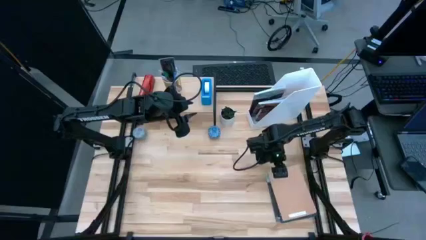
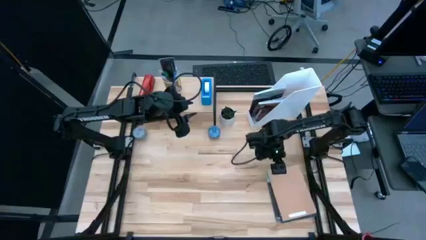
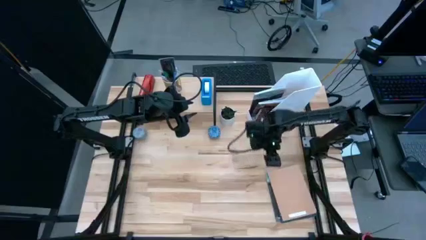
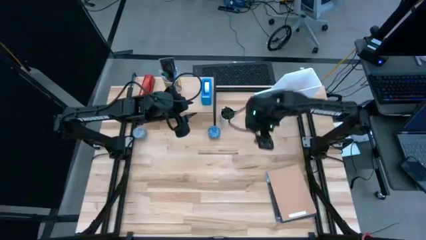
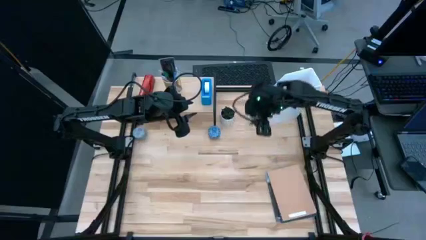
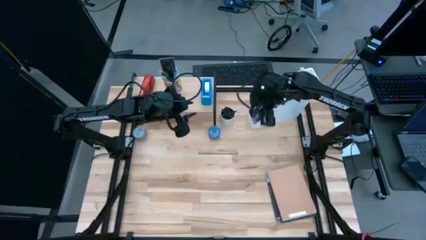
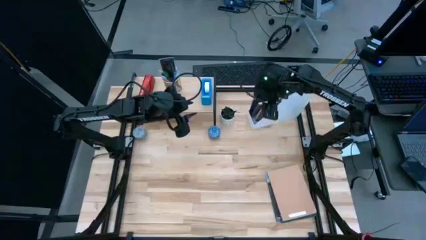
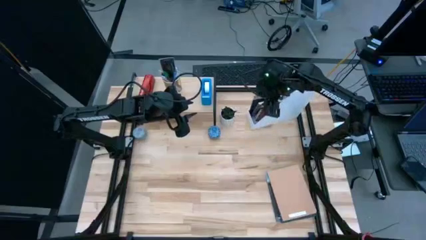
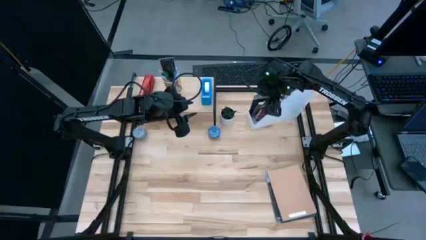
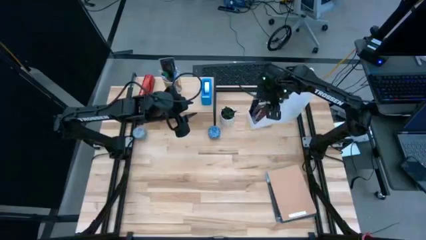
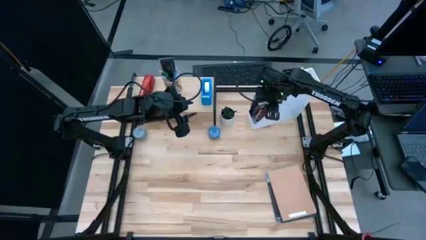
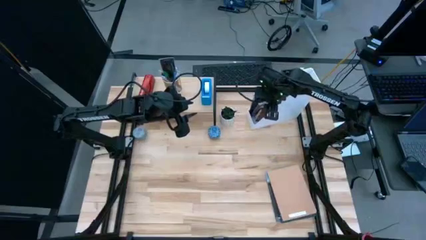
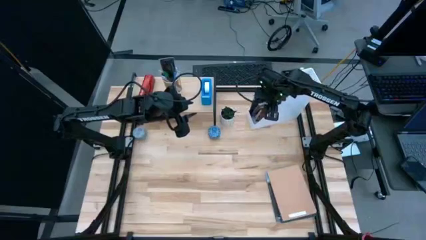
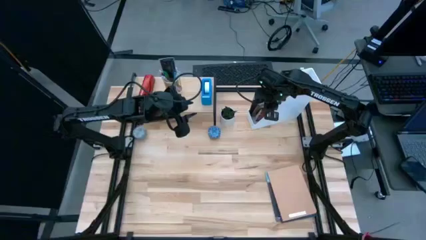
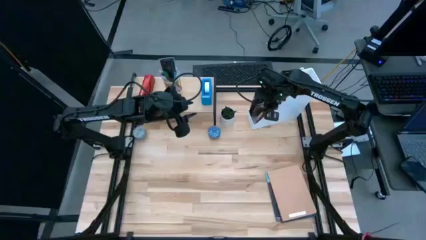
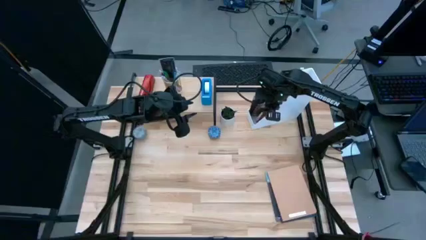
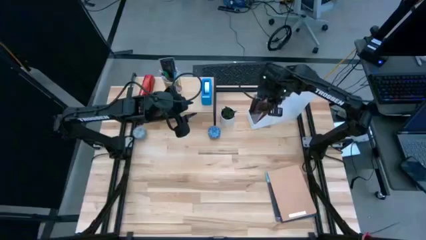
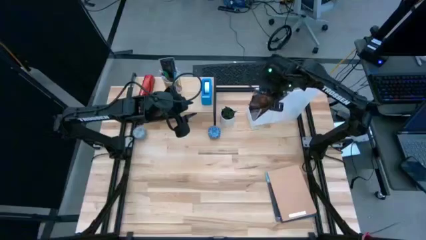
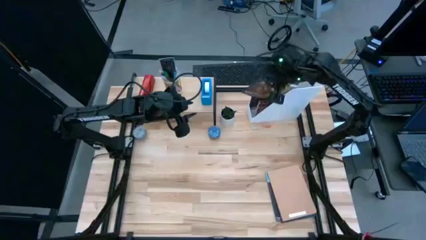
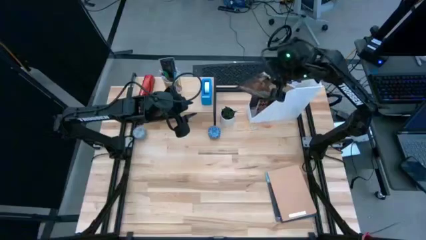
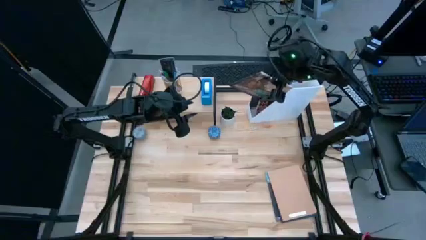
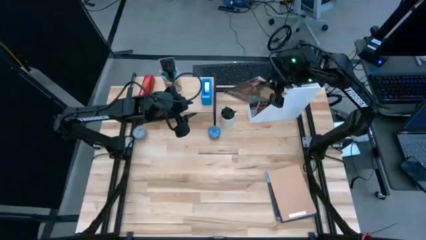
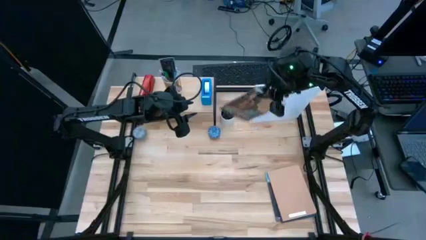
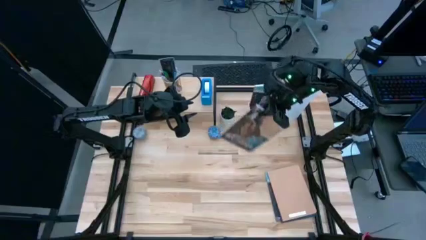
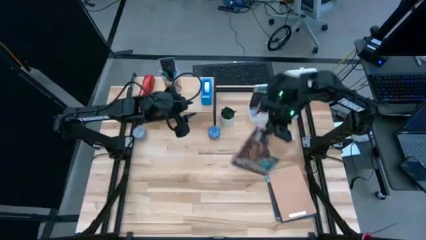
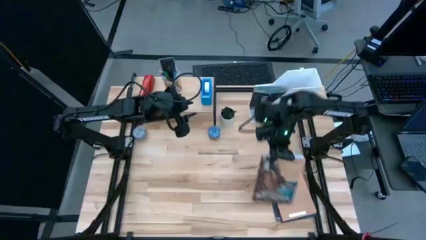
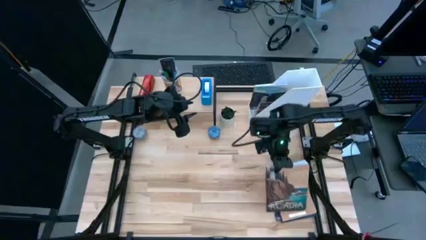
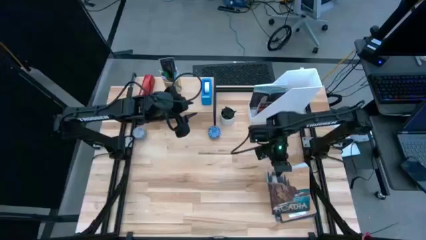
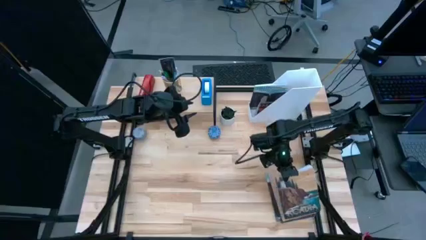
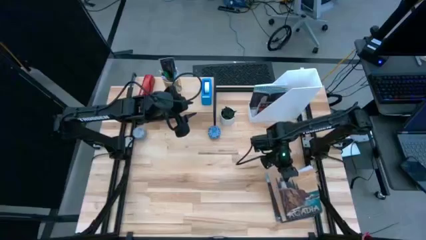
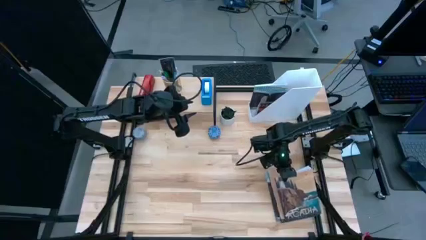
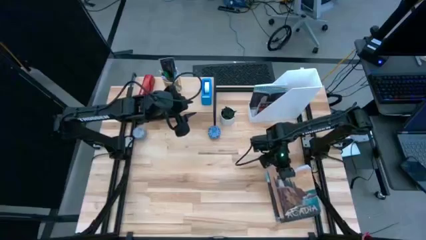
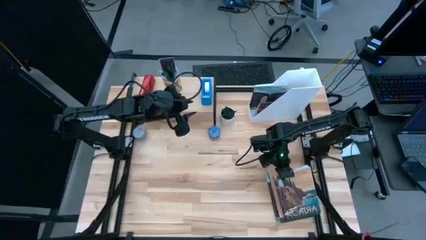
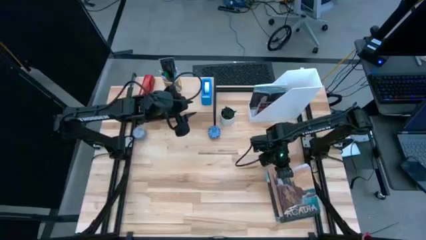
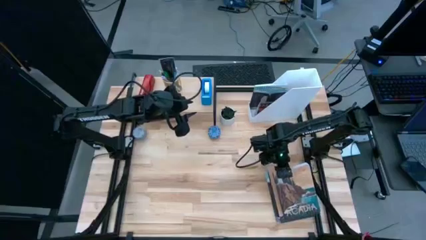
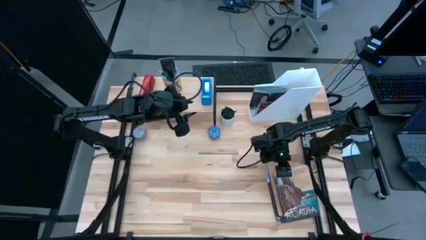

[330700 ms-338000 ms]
Task: Stock shelves
Remove the blue/brown book from the white book shelf

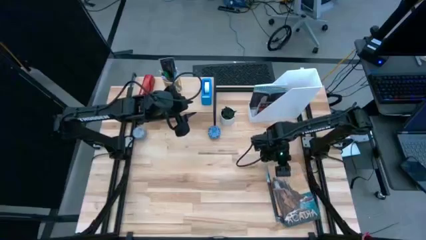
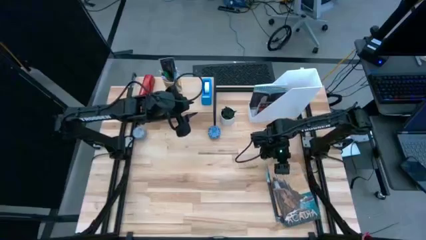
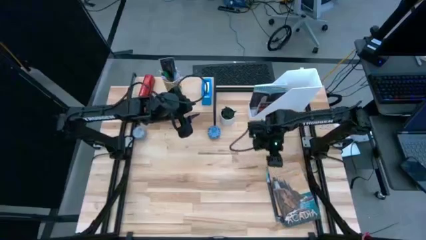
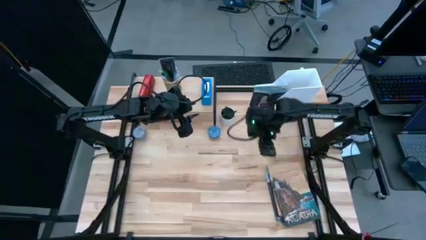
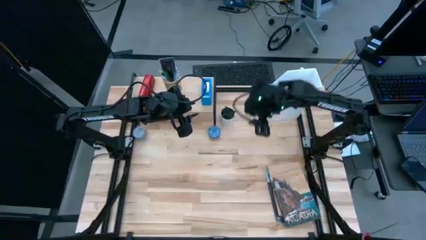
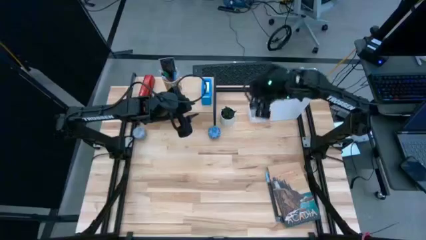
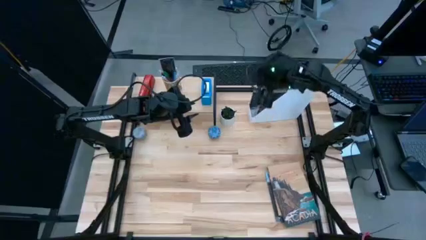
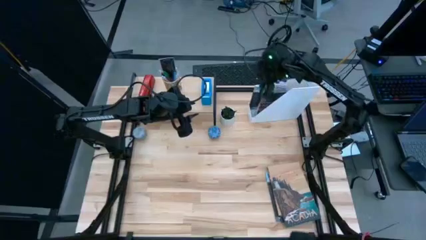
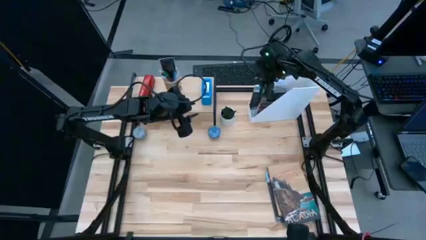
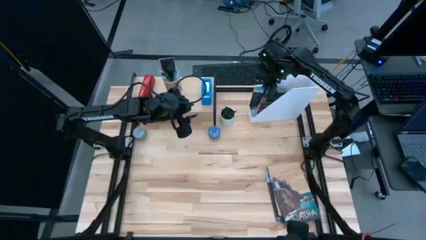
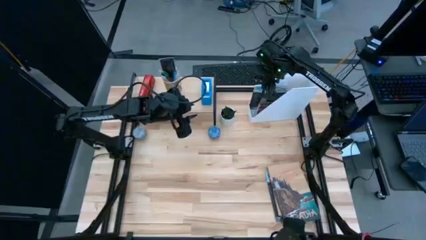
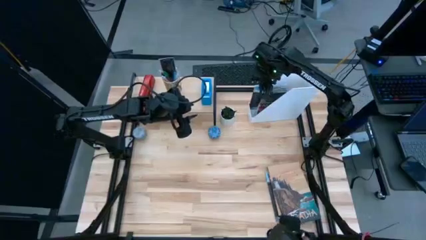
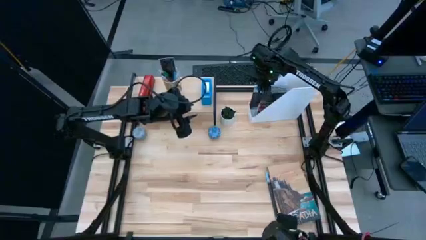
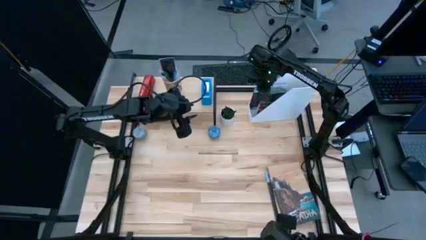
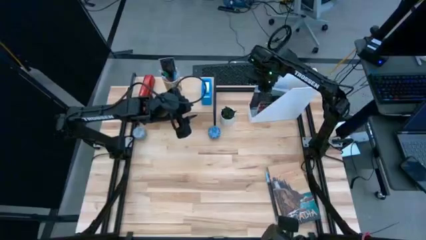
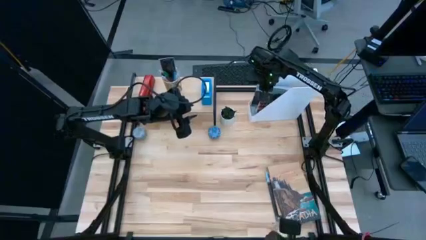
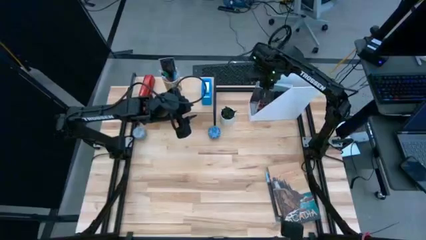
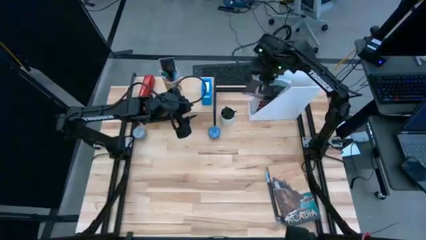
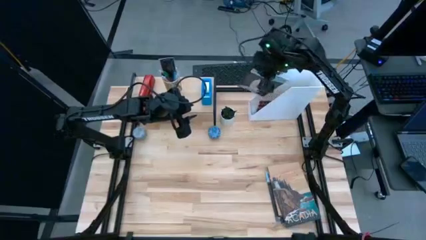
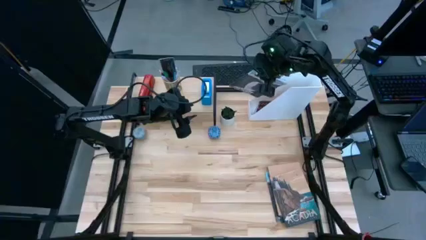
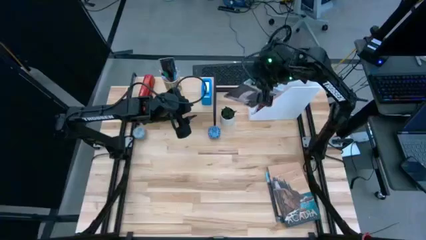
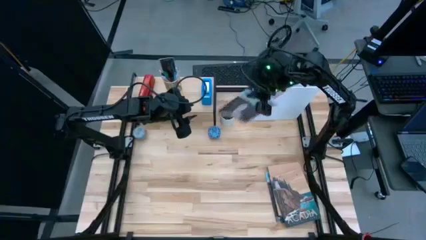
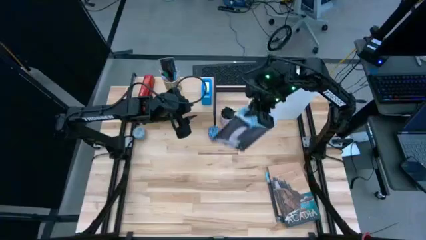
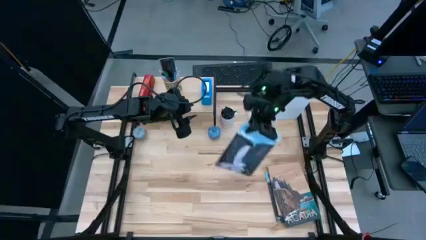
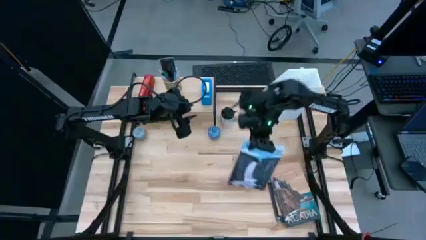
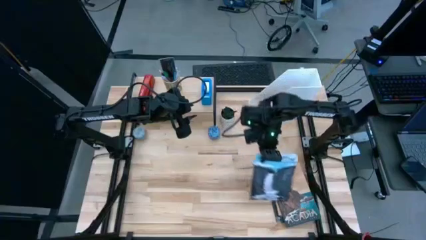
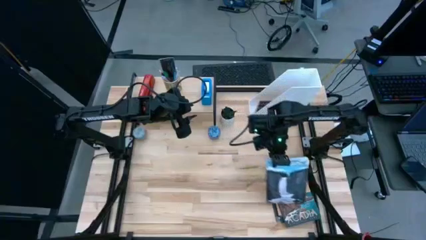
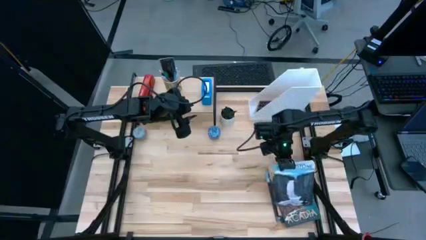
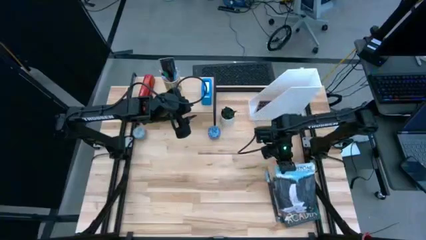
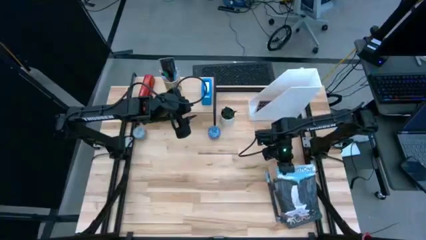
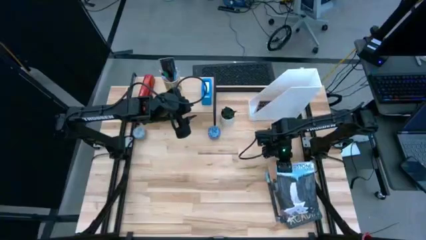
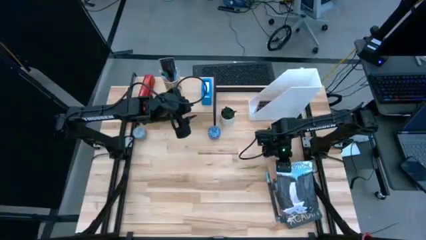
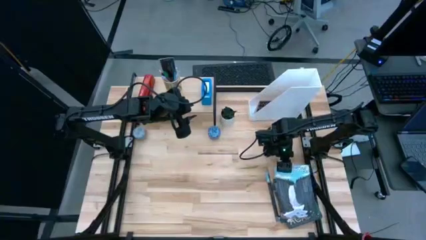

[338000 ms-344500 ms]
Remove the blue/brown book from the white book shelf

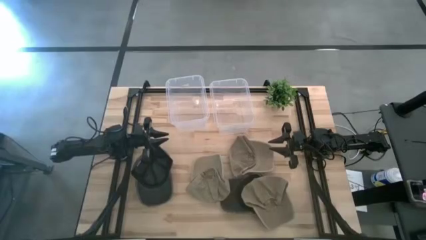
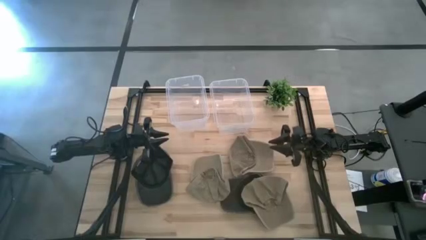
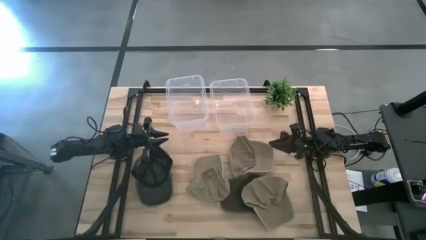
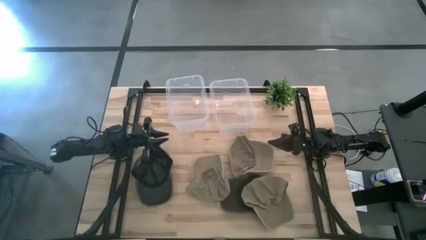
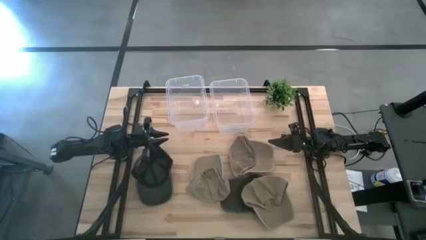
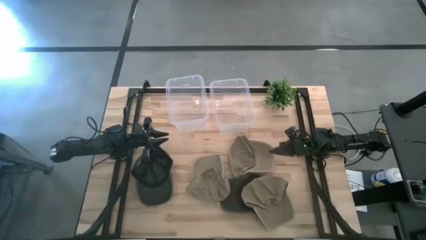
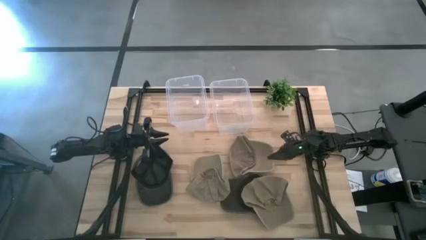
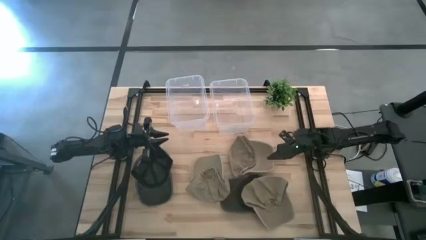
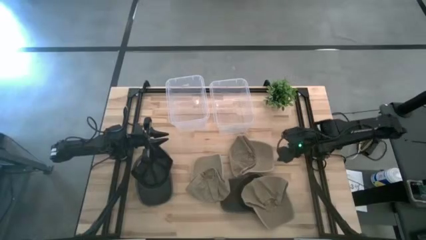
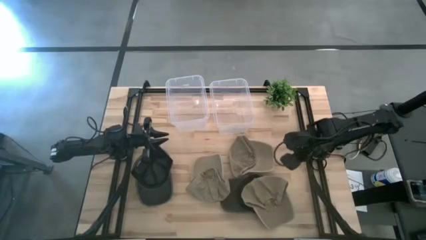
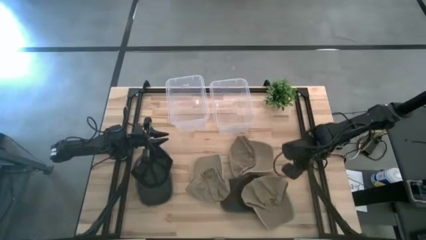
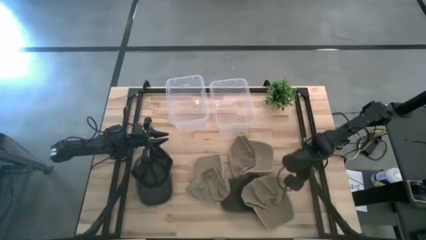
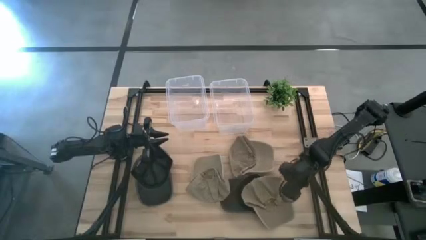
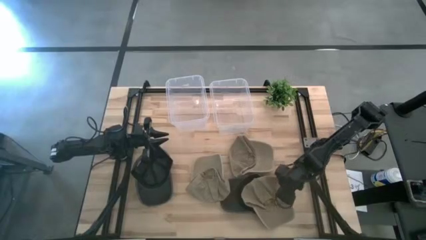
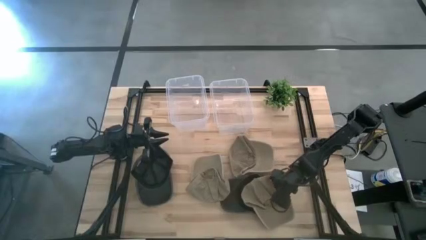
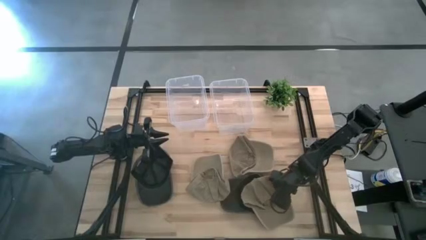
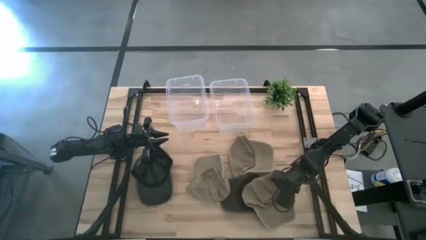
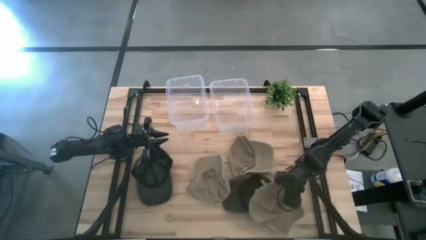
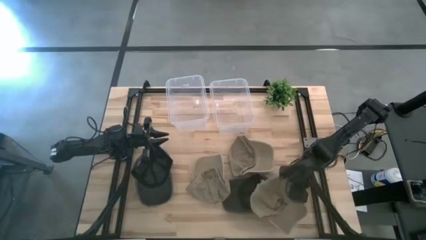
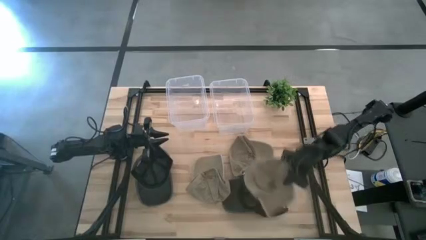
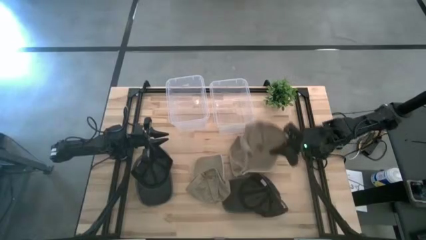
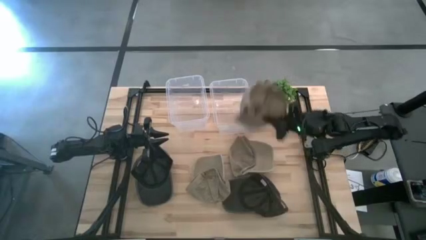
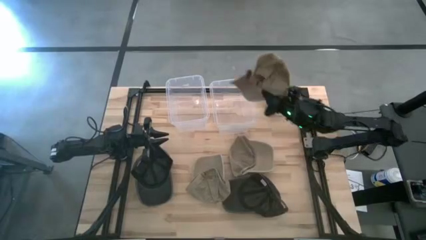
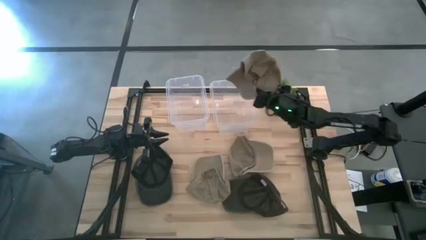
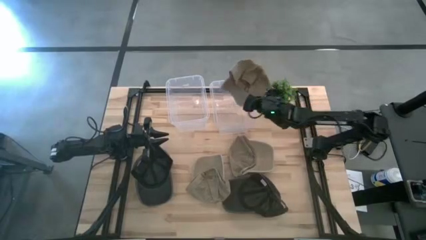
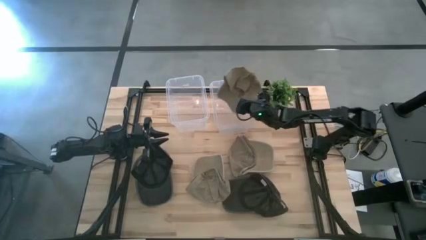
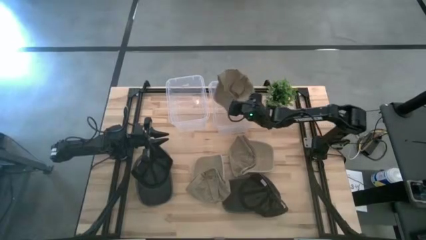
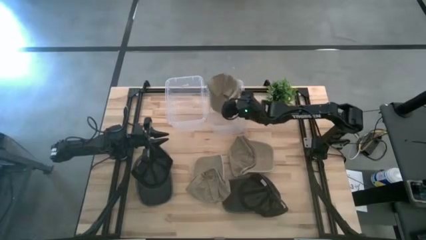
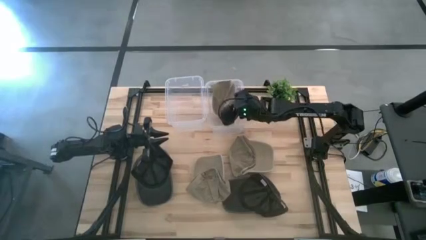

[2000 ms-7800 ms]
Task: Pick & Place hat
Put the bottom right brown cap into the right transparent bin
